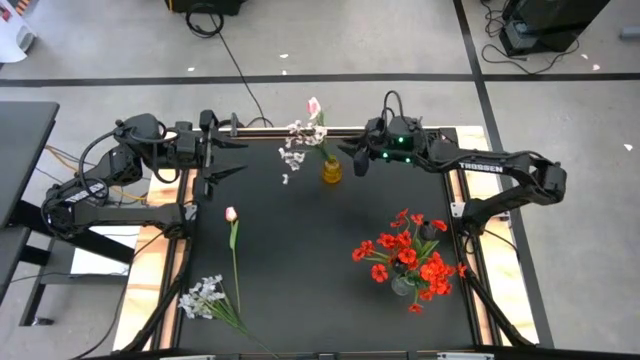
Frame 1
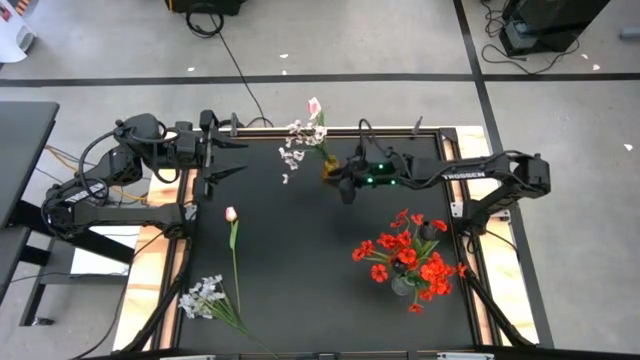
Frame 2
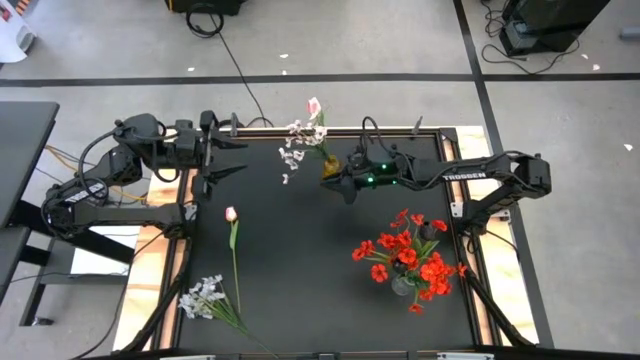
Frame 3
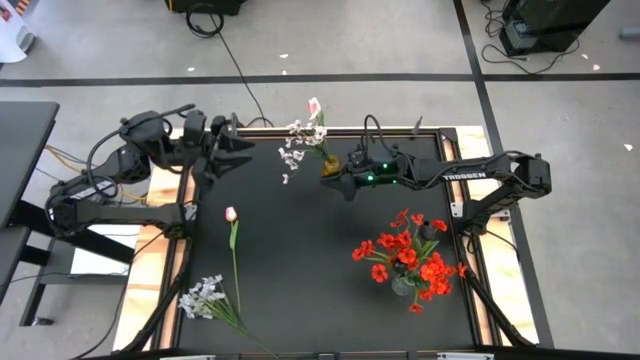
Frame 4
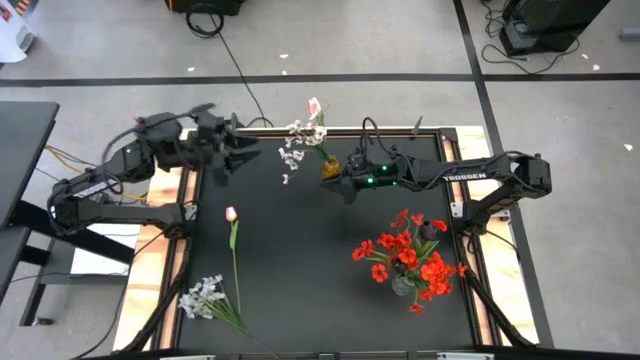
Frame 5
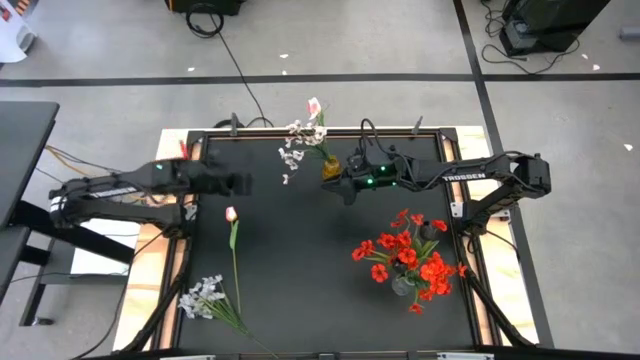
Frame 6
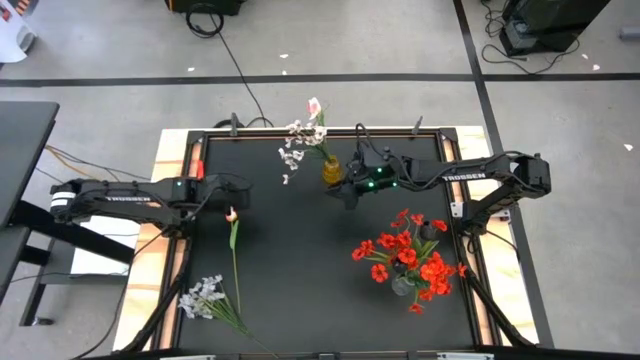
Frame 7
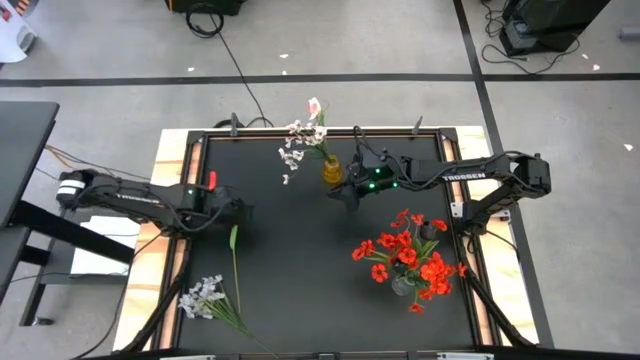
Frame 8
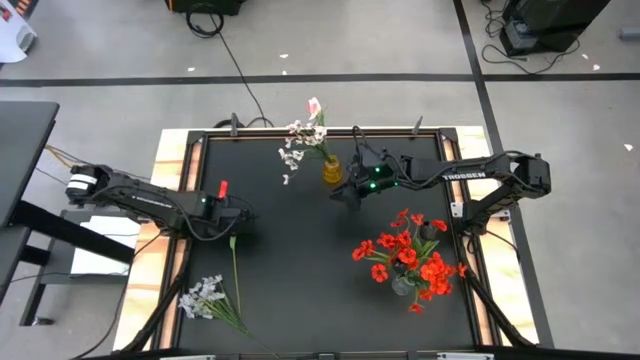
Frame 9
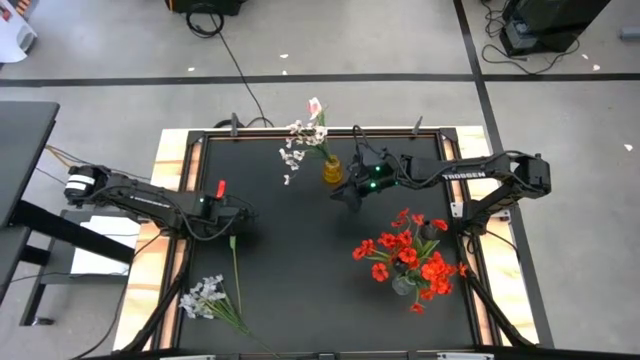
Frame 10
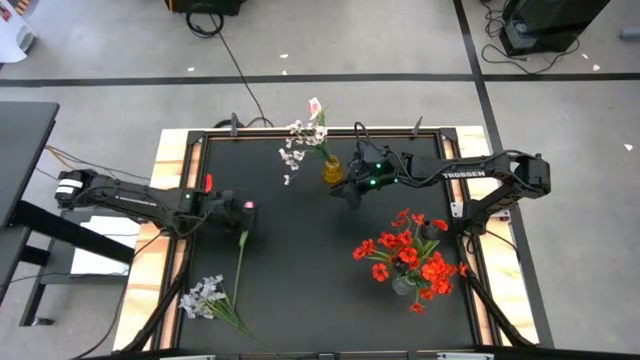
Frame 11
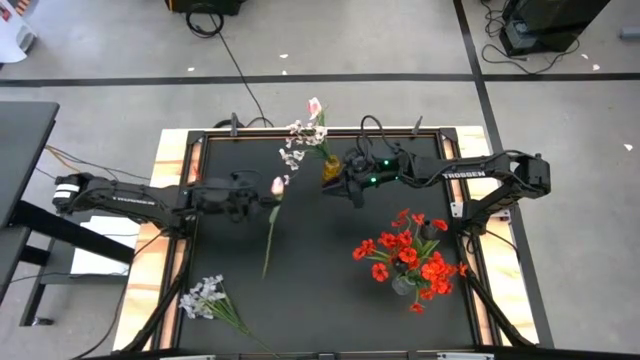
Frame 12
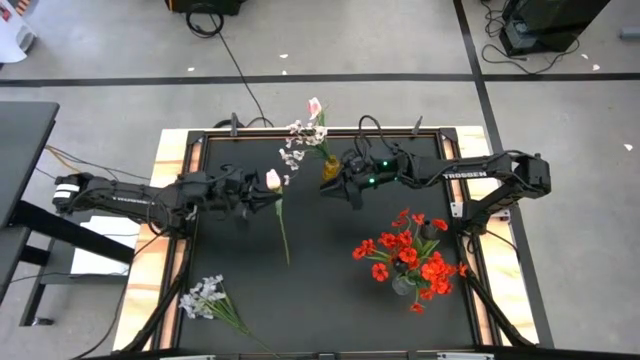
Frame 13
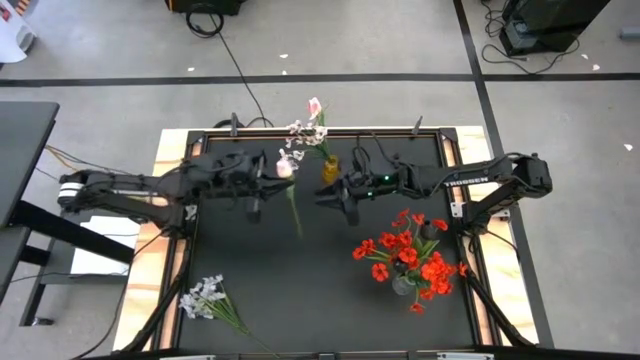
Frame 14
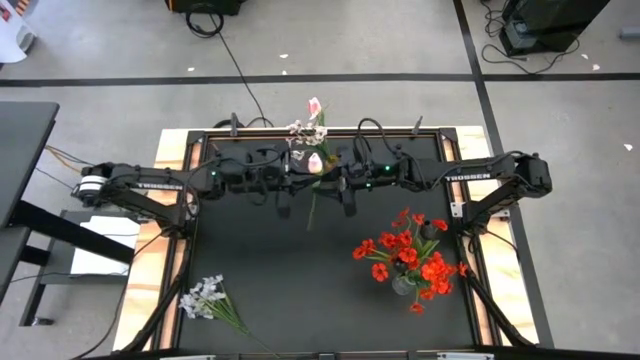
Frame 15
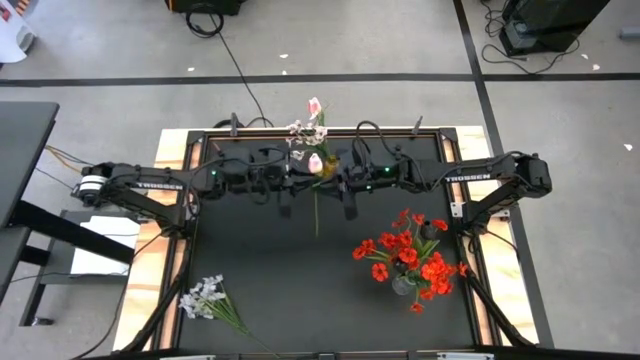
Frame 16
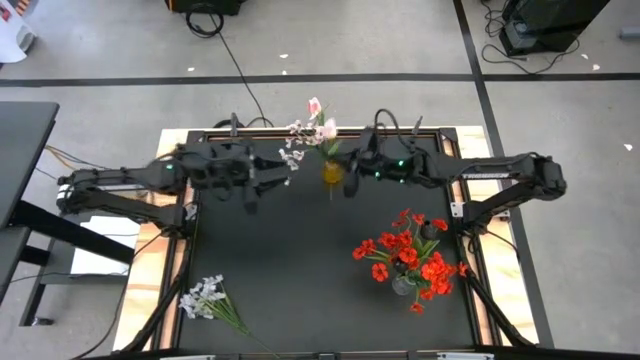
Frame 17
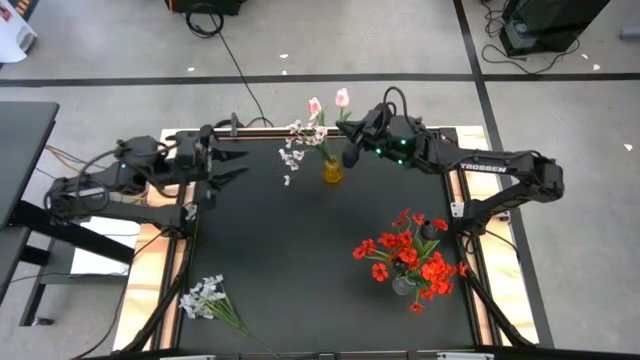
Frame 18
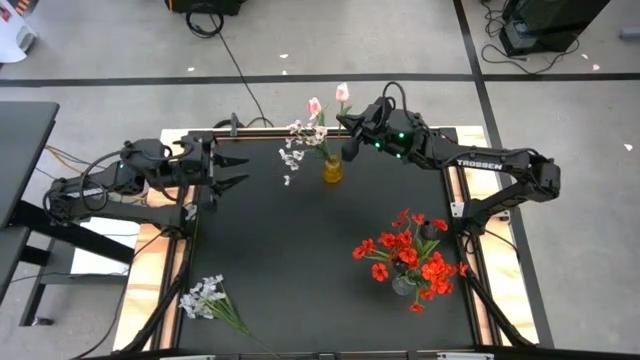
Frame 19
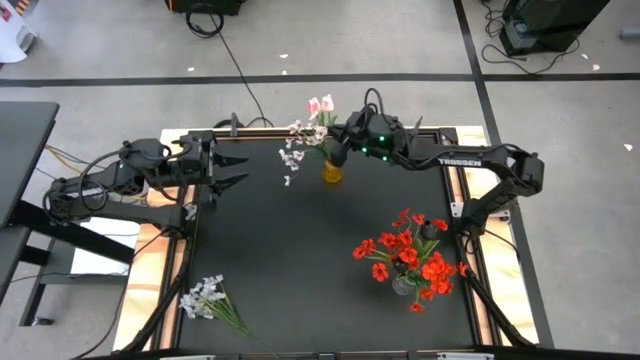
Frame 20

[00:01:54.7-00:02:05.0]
Task: Sort flowers into vase by color
Put the pink flower into the yellow vase

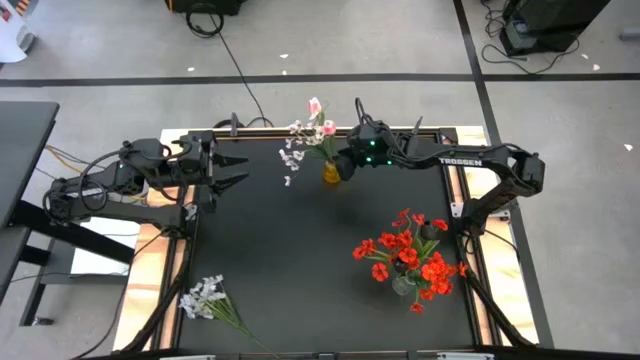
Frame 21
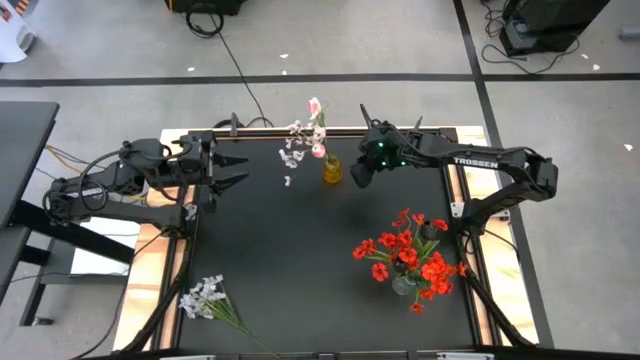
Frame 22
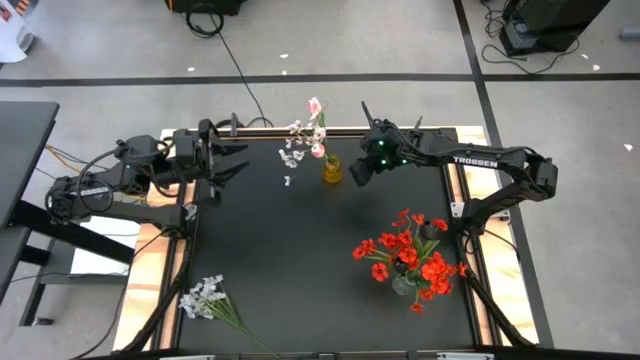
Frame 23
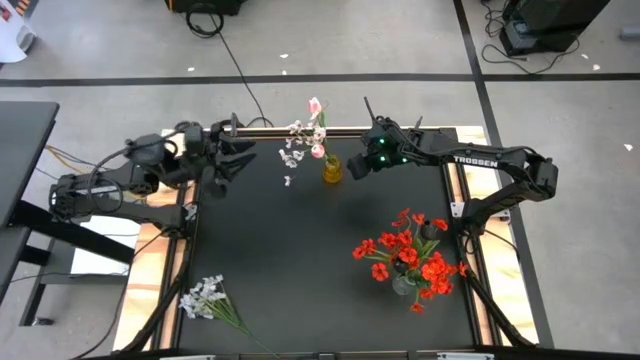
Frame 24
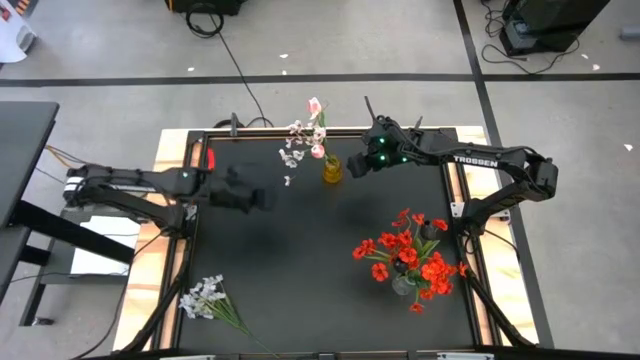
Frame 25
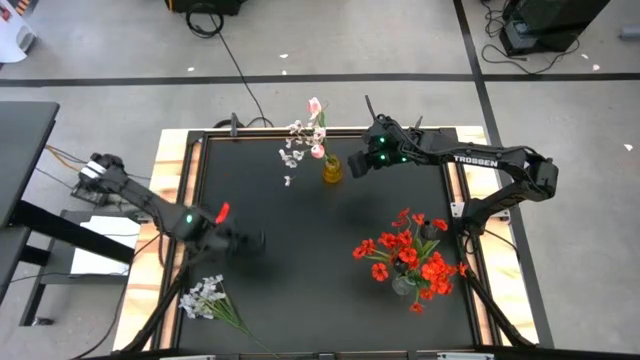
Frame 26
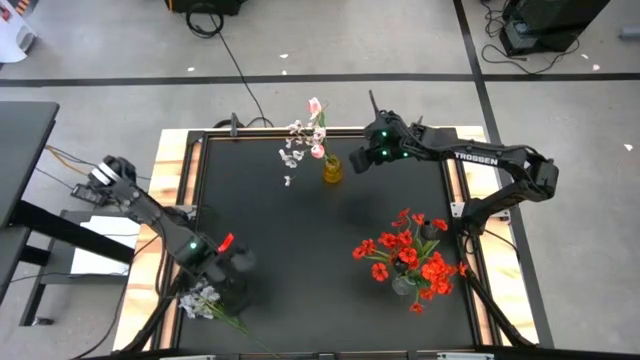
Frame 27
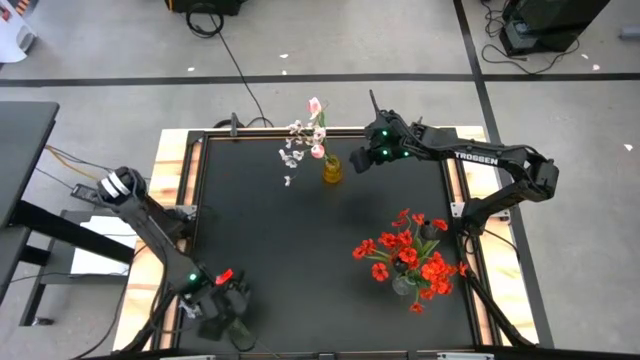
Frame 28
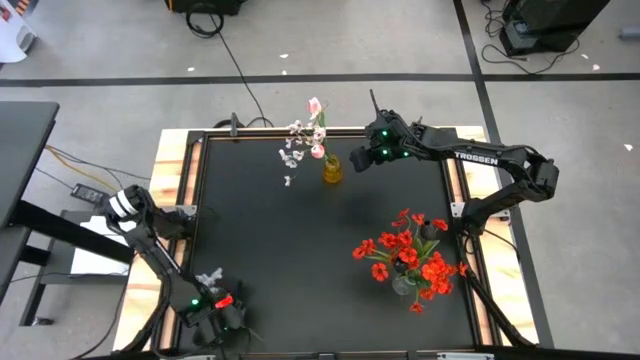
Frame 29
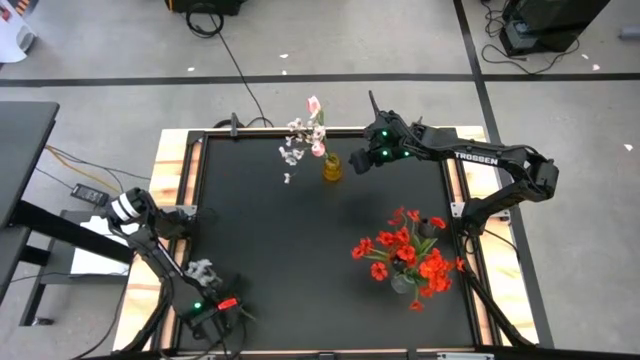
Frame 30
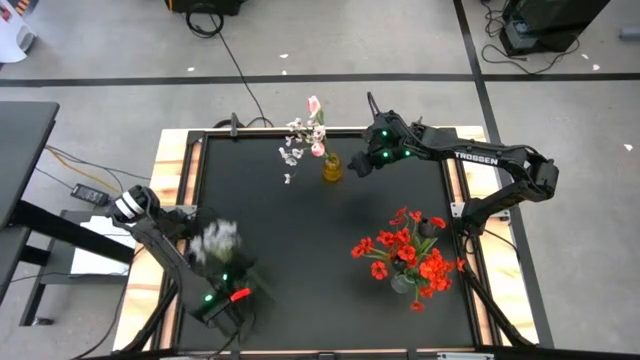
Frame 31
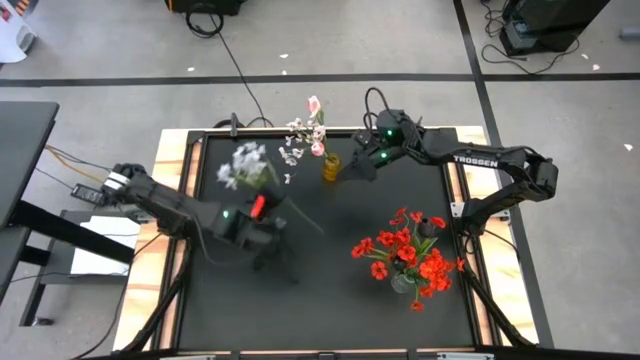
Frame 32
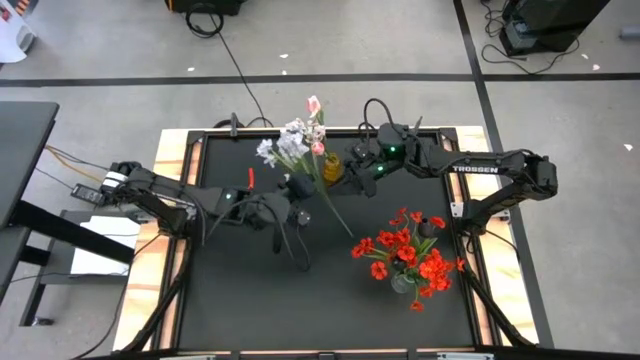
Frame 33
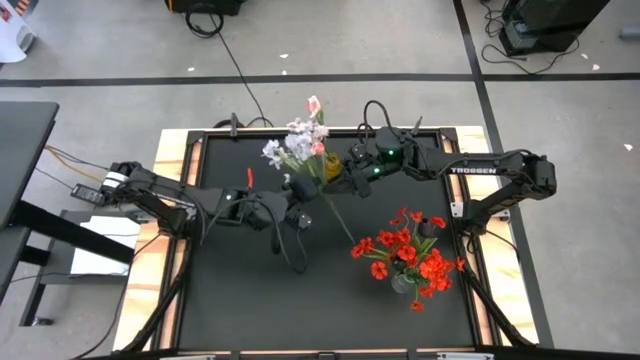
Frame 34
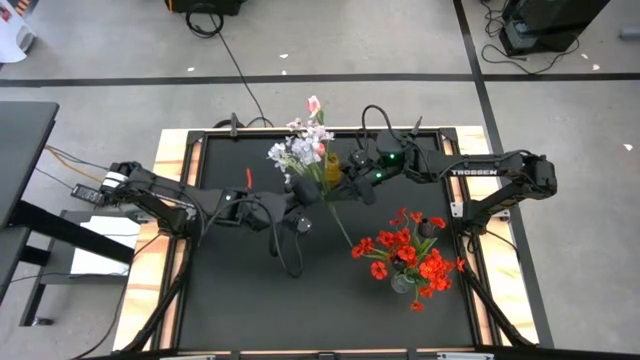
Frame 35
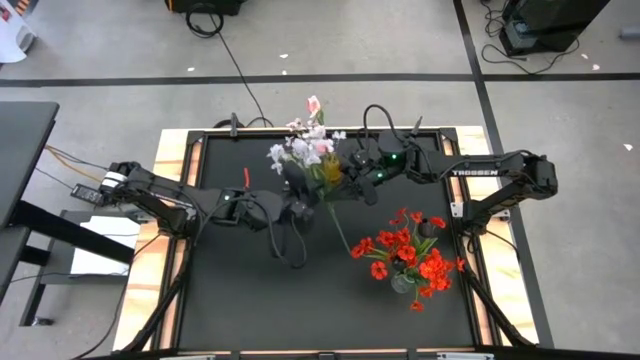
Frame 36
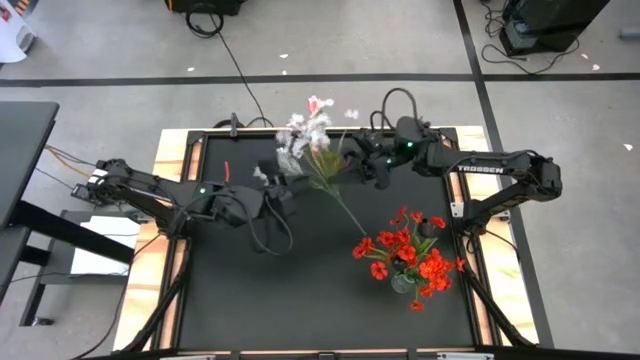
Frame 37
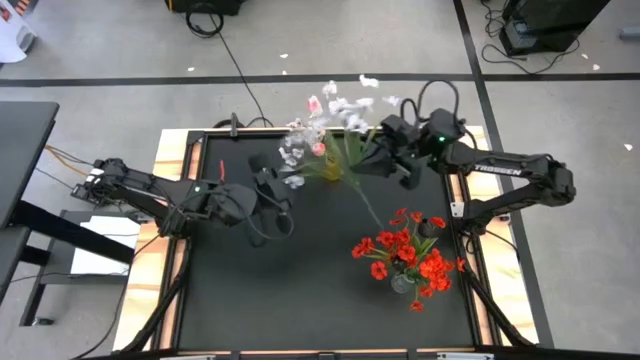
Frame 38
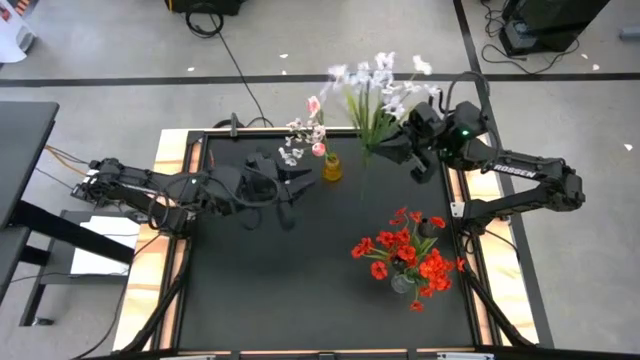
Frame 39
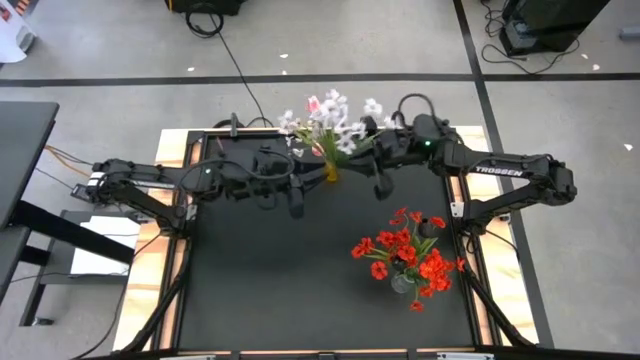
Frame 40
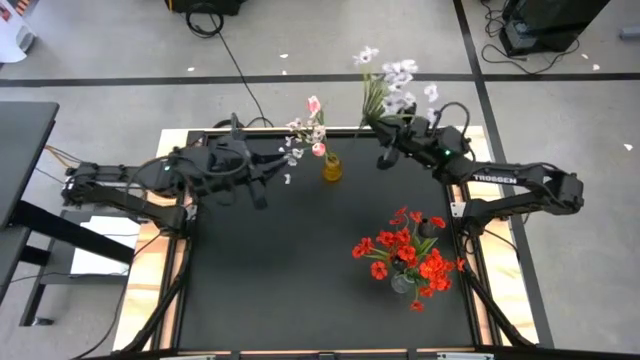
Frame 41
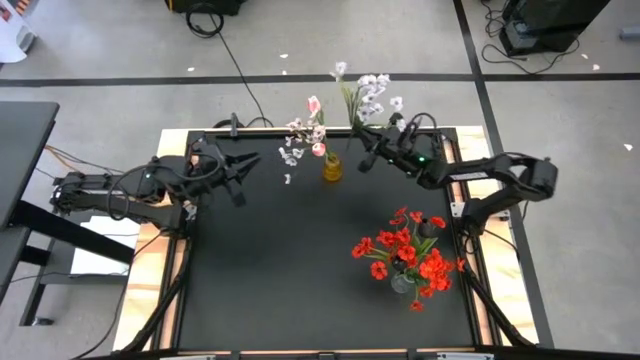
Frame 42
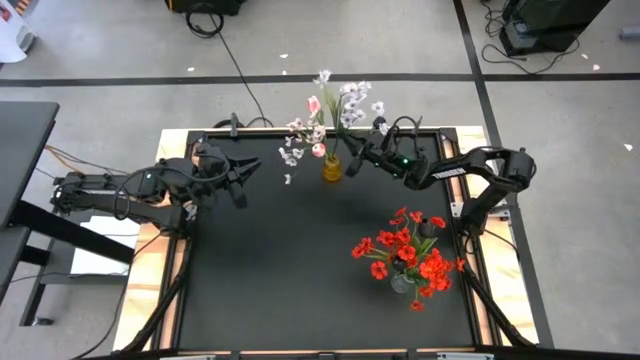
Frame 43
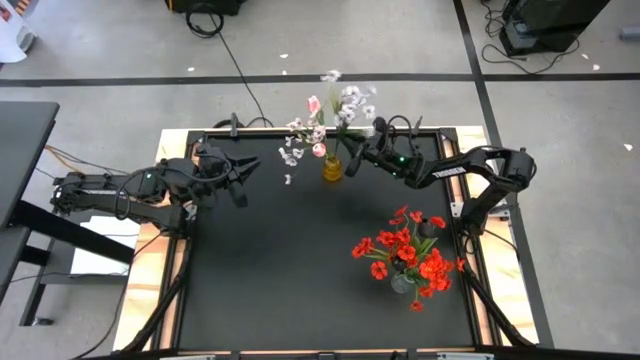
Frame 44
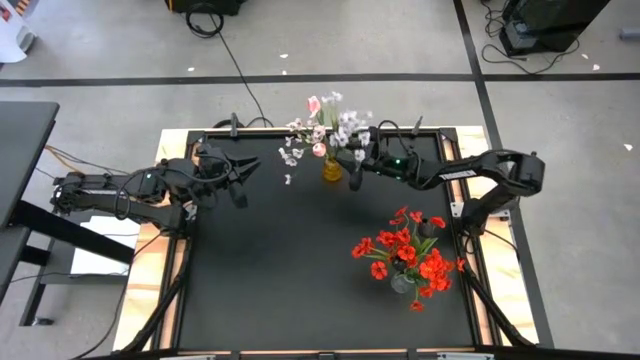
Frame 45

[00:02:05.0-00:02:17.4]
Put the white flowers into the yellow vase
